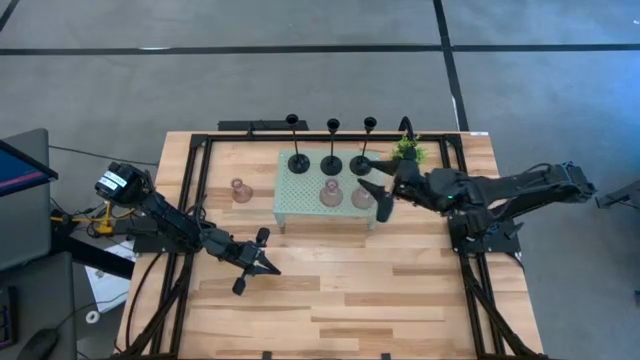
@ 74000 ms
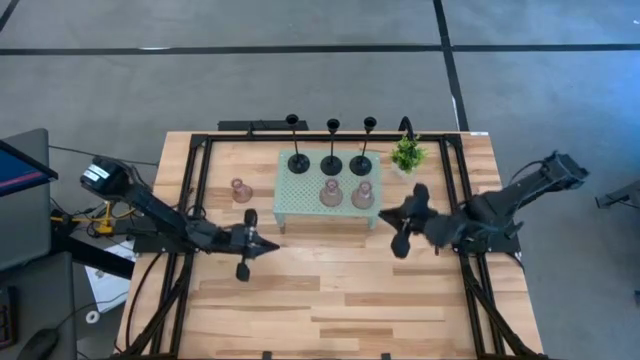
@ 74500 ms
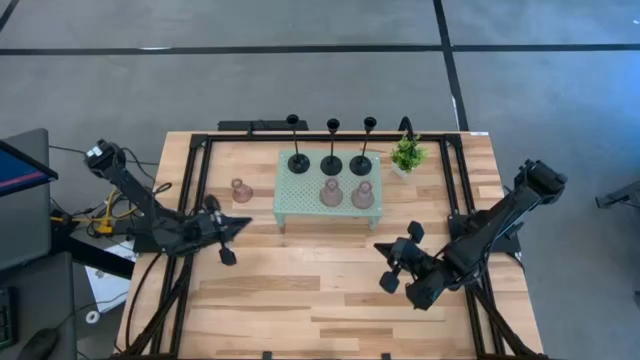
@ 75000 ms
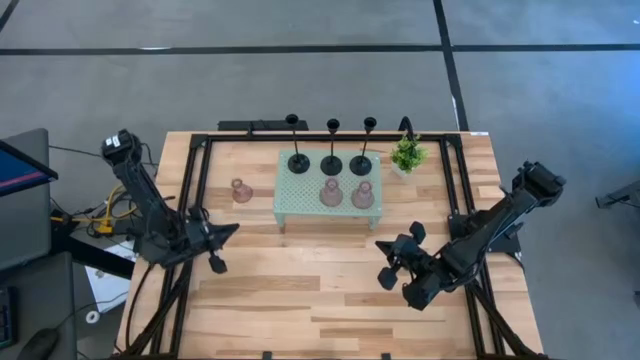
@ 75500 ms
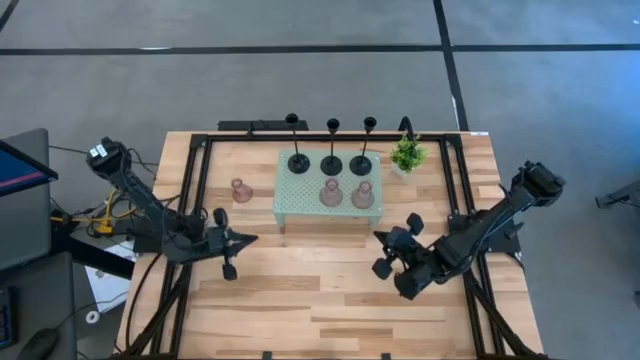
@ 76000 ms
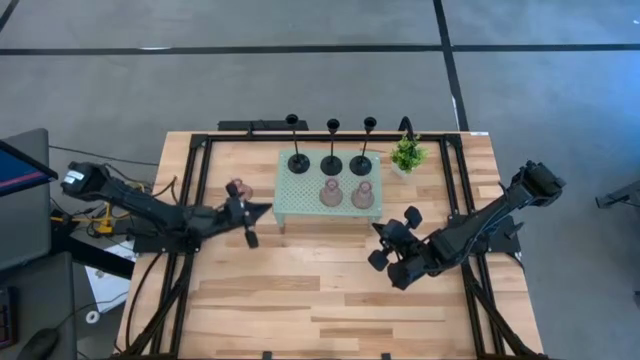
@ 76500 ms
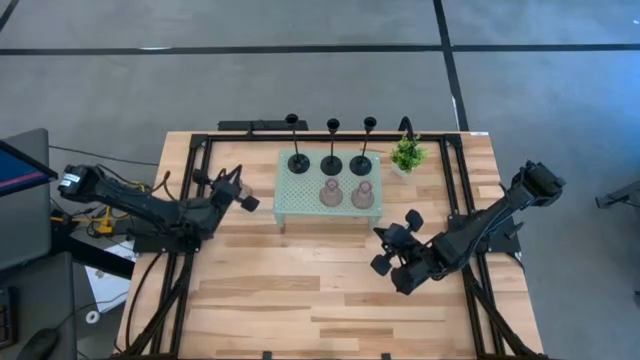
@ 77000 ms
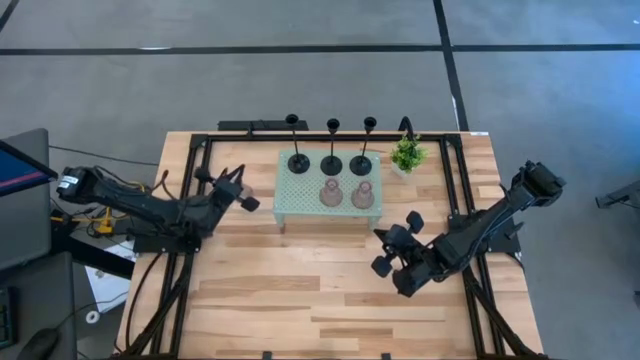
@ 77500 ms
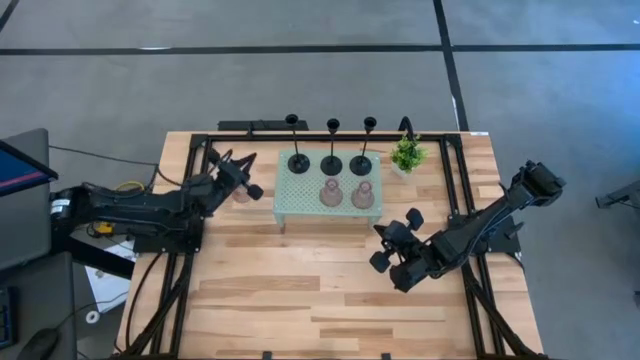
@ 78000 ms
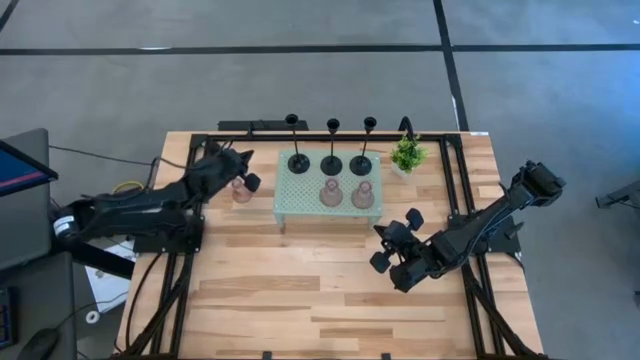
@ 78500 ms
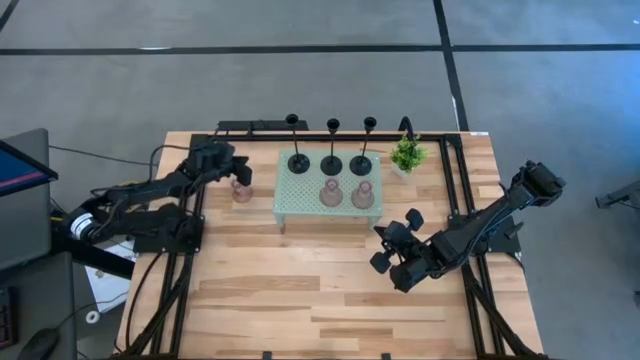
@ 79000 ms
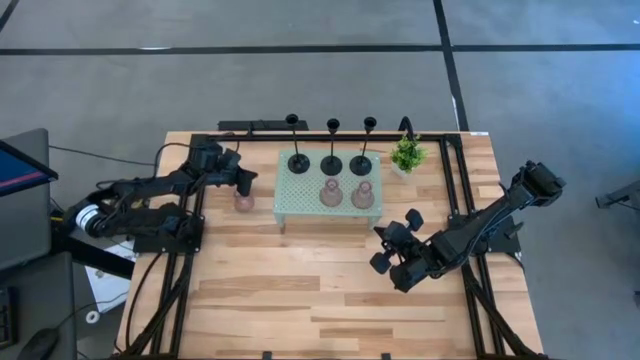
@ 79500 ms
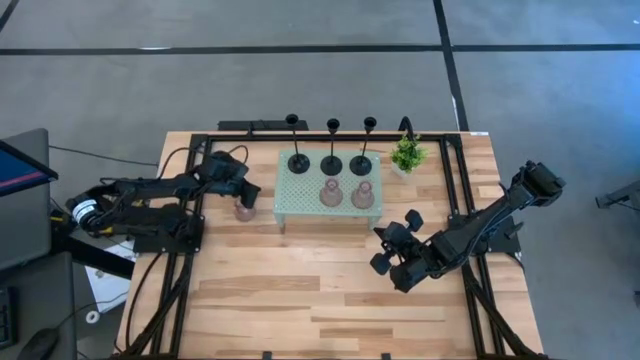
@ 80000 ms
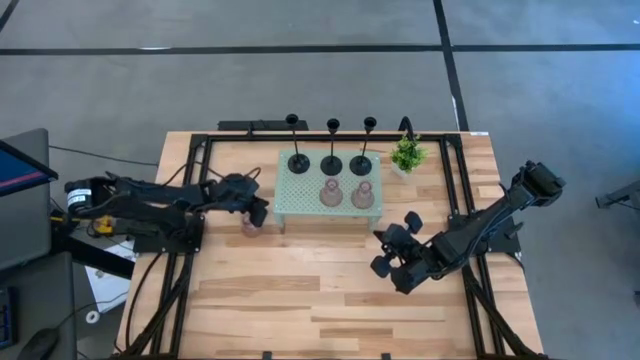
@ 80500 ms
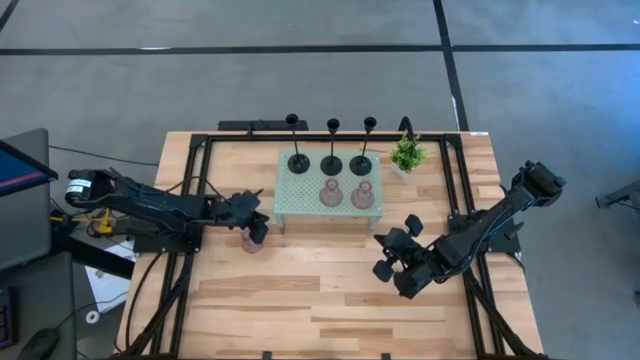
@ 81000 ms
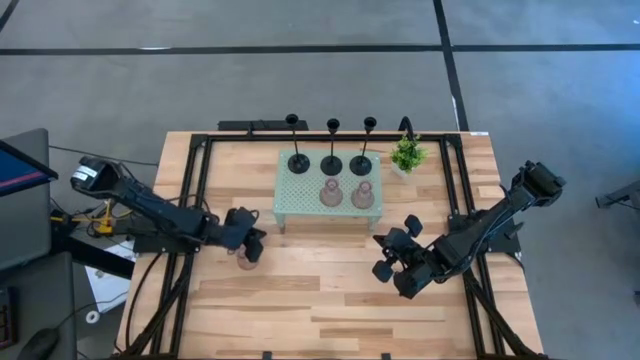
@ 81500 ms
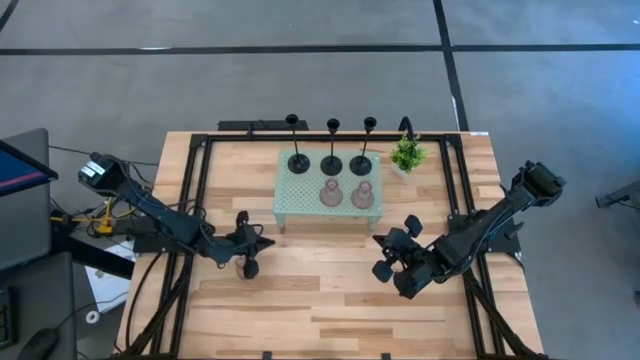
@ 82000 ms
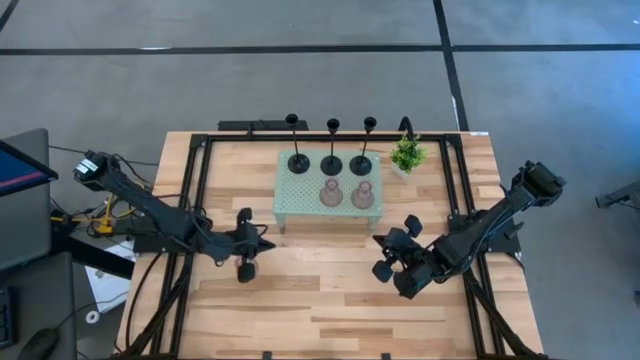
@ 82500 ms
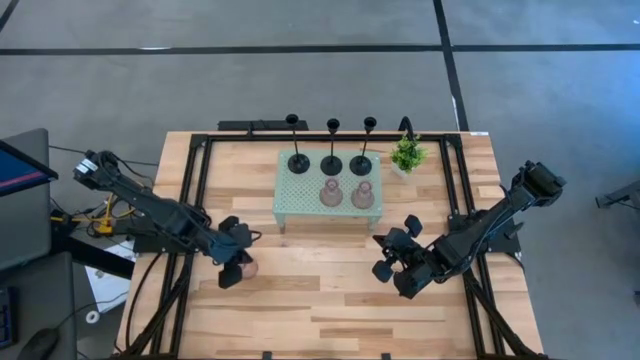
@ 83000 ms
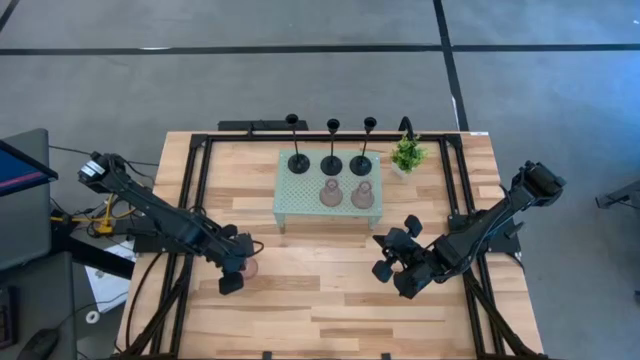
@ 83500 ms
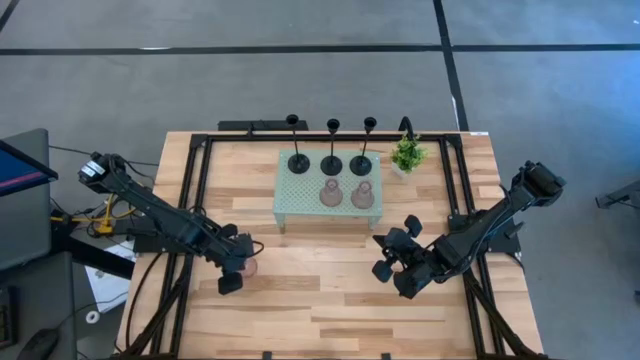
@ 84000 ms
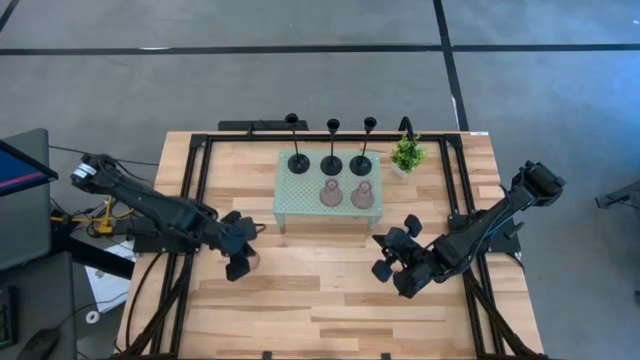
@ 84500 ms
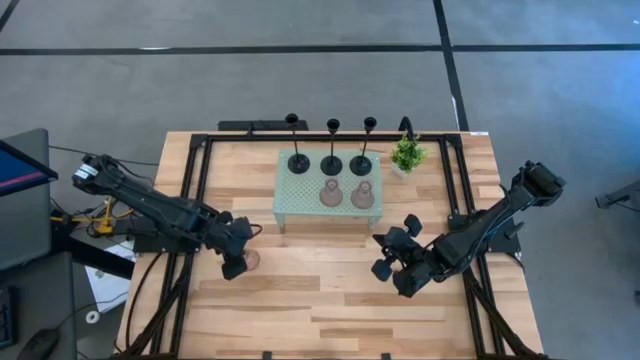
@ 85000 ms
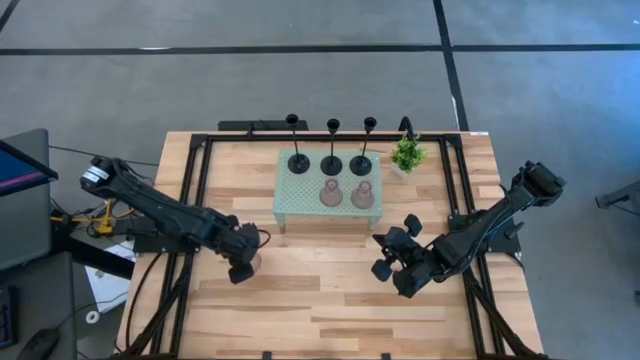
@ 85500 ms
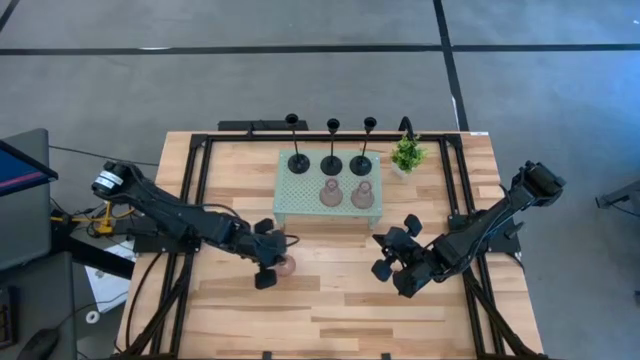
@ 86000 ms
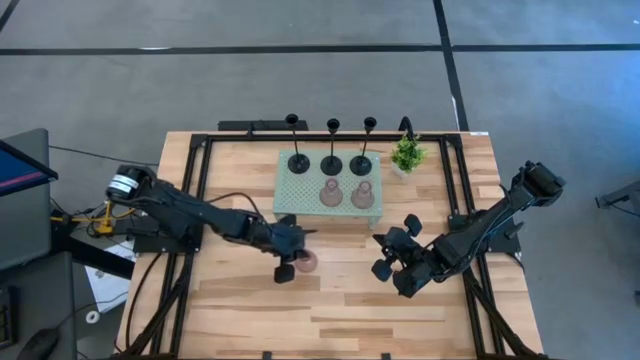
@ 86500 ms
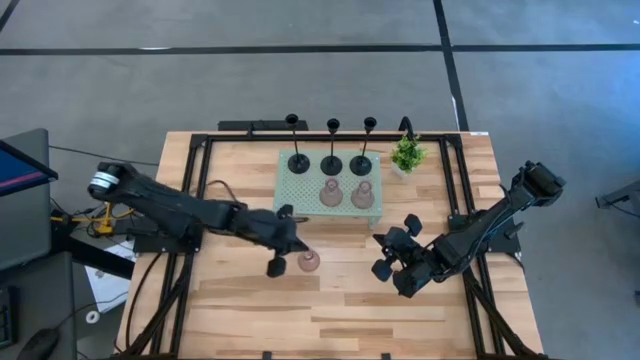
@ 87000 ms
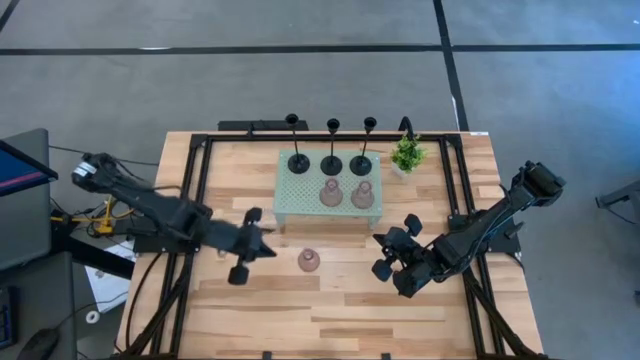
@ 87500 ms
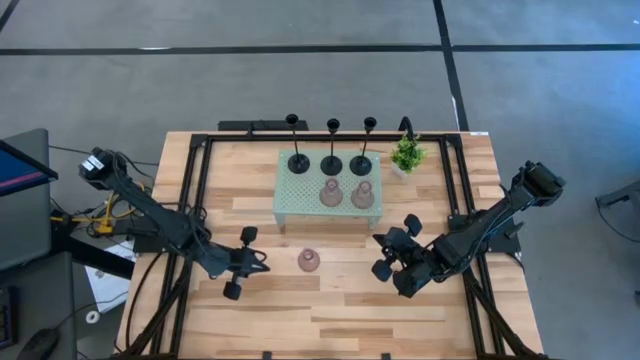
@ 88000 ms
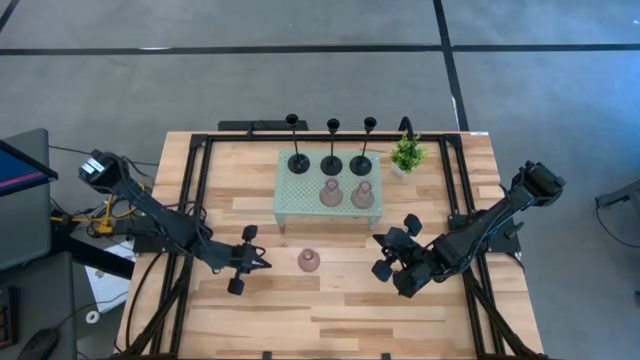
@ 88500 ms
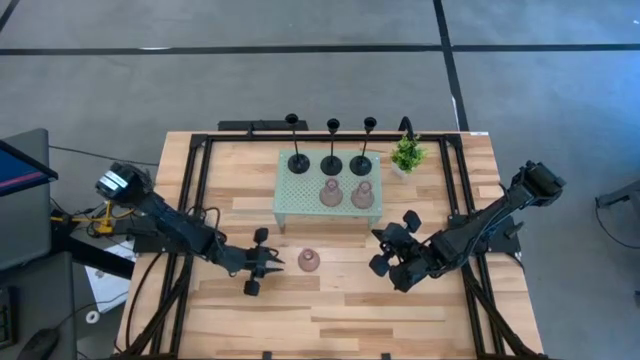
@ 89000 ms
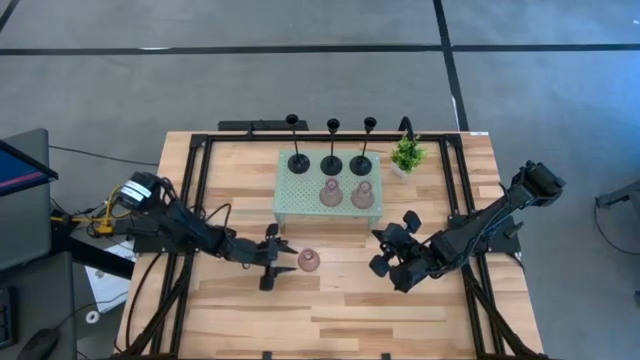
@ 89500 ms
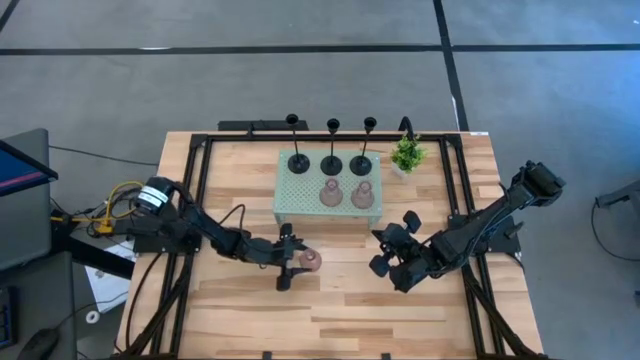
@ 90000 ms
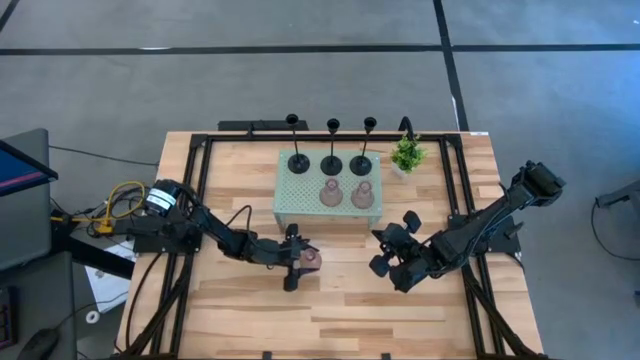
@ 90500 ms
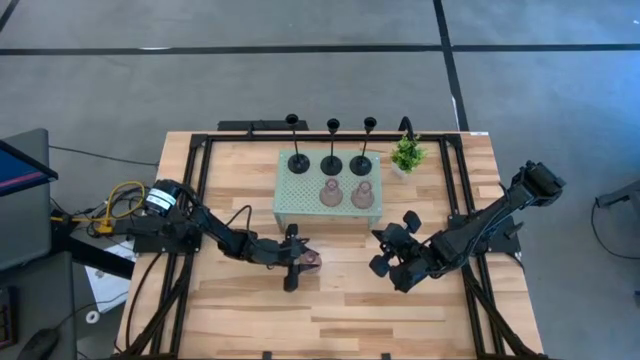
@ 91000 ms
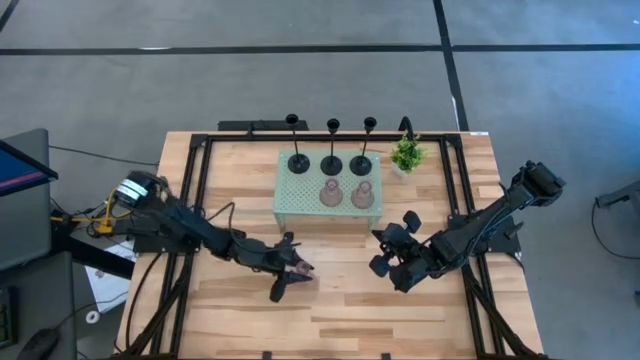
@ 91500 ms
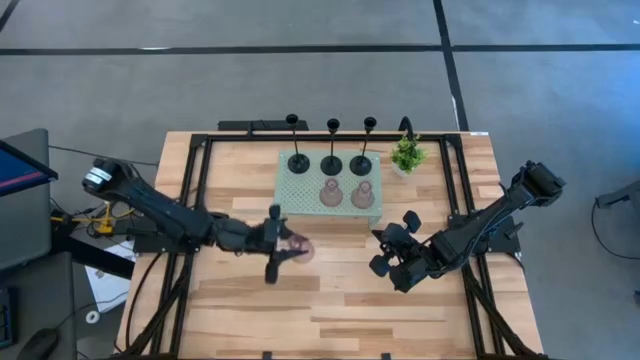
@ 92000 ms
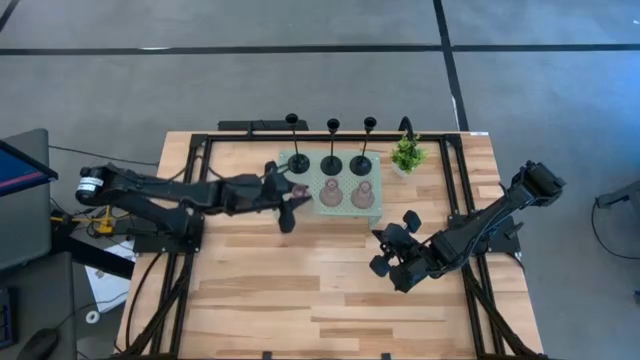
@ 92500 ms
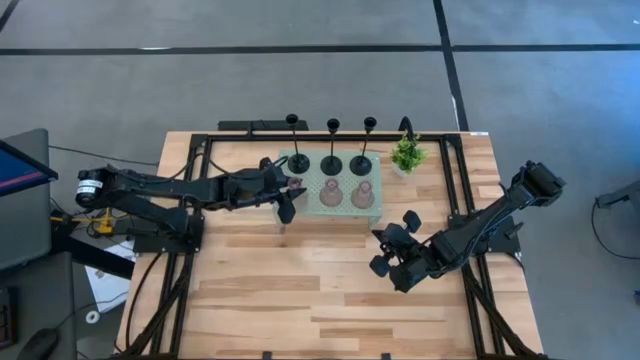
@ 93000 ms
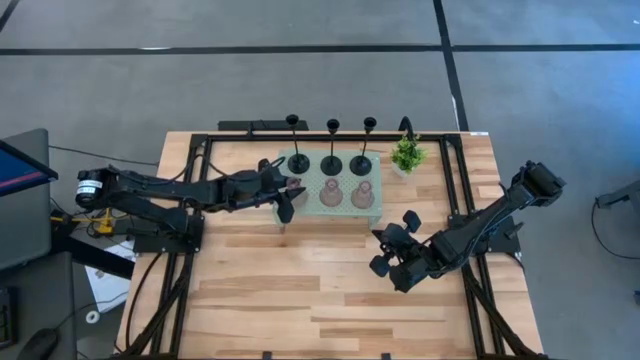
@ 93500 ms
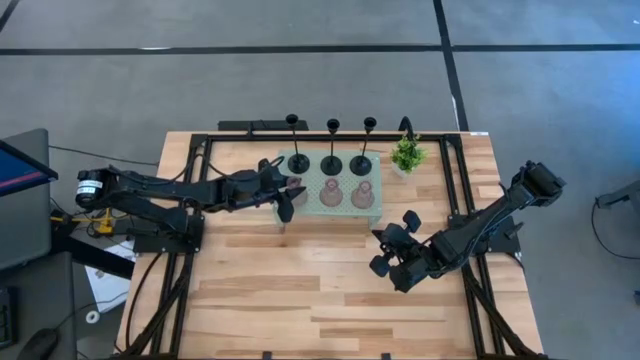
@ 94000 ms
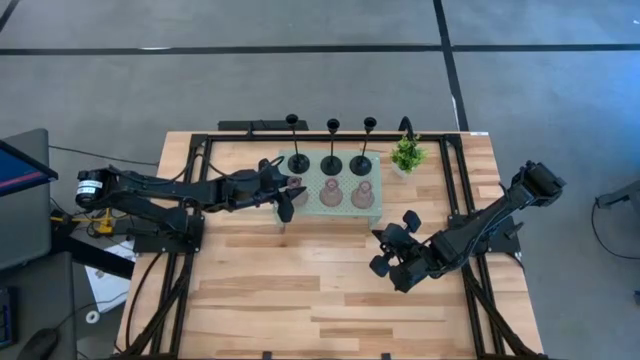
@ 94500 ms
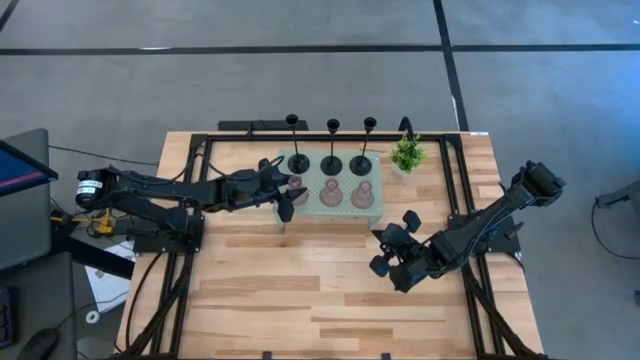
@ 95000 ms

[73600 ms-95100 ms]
Task: Pick & Place candle stick holders
Put the glass candle holder on the shelf aligned with the other black candle holder
